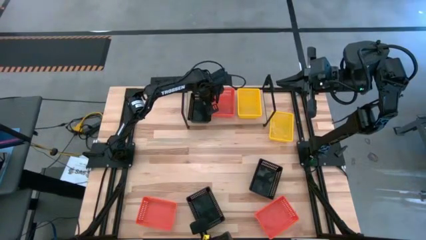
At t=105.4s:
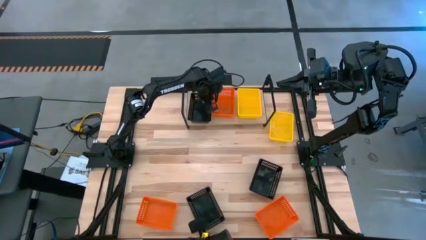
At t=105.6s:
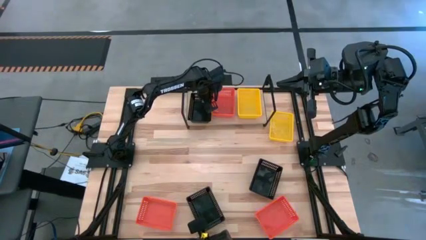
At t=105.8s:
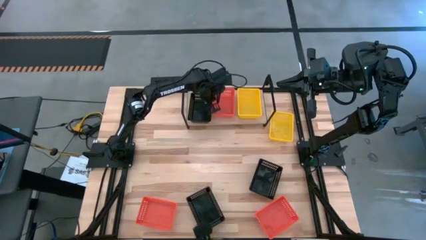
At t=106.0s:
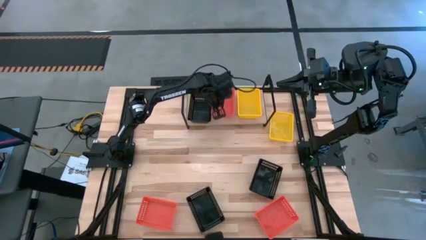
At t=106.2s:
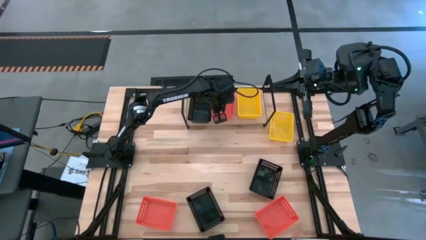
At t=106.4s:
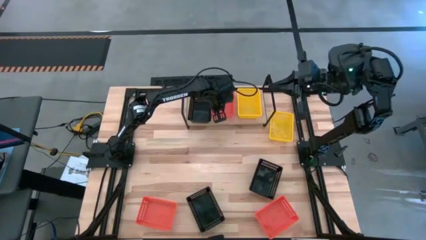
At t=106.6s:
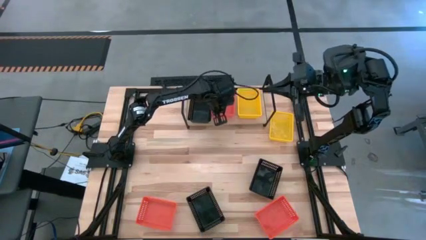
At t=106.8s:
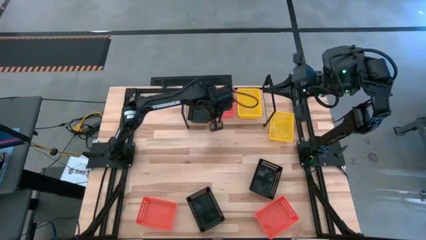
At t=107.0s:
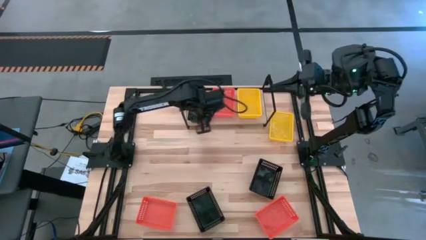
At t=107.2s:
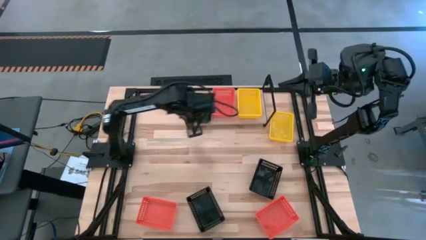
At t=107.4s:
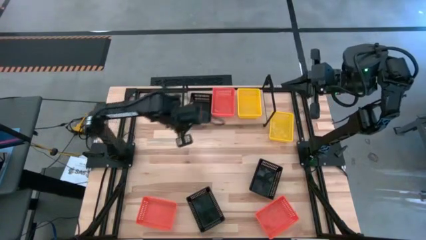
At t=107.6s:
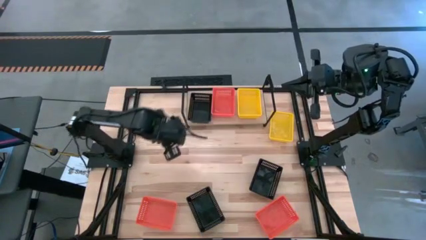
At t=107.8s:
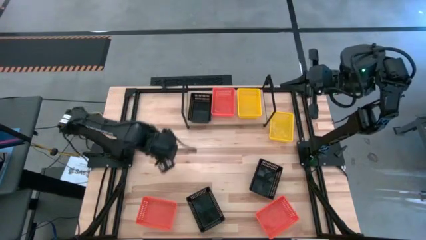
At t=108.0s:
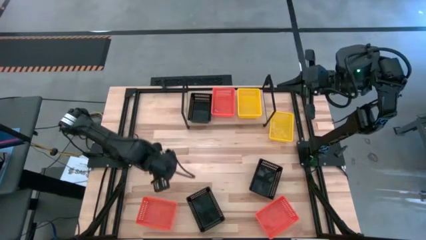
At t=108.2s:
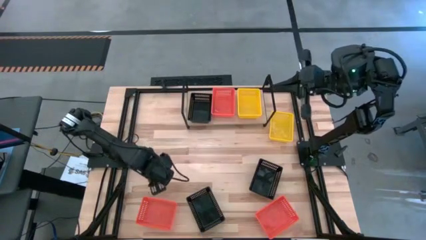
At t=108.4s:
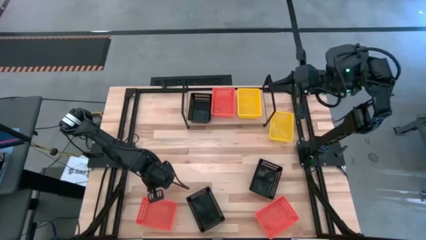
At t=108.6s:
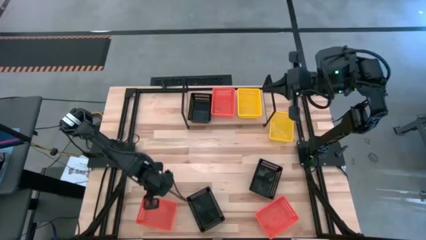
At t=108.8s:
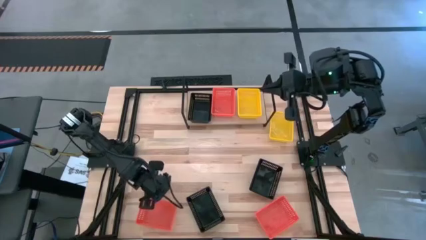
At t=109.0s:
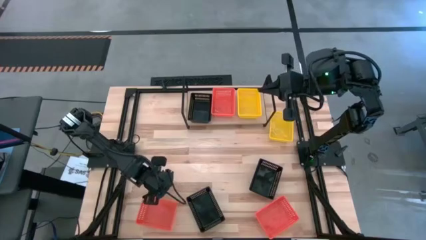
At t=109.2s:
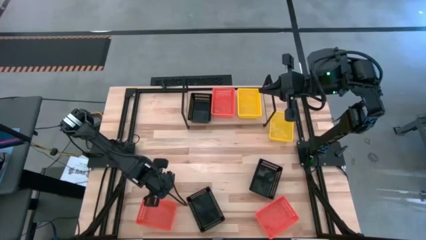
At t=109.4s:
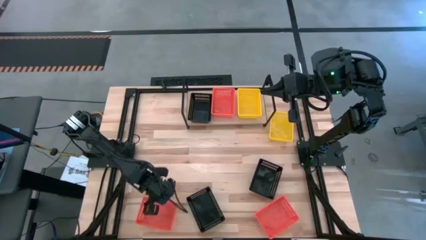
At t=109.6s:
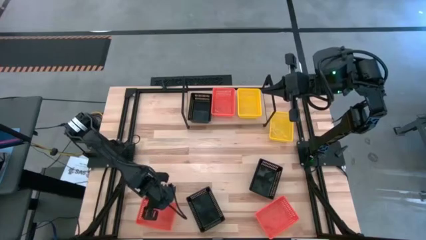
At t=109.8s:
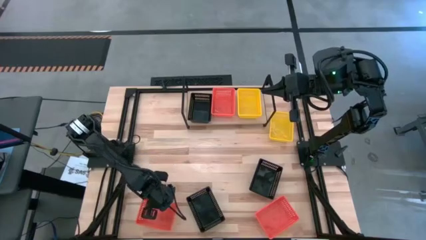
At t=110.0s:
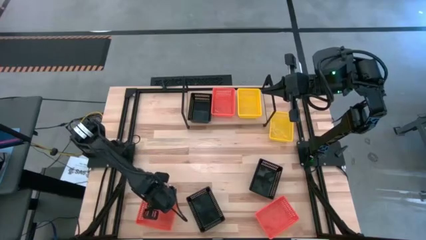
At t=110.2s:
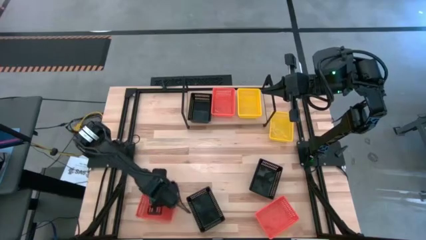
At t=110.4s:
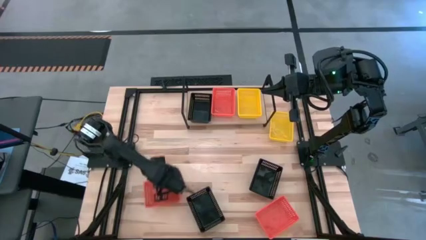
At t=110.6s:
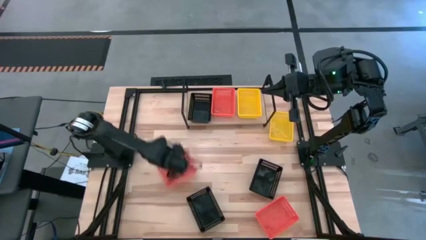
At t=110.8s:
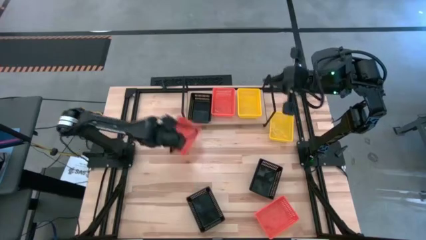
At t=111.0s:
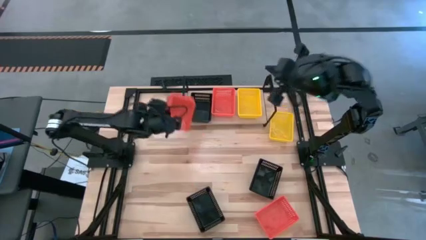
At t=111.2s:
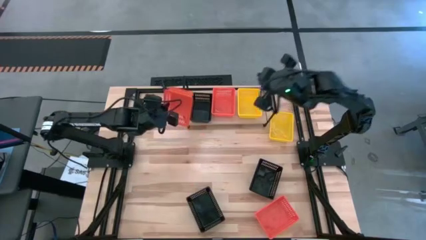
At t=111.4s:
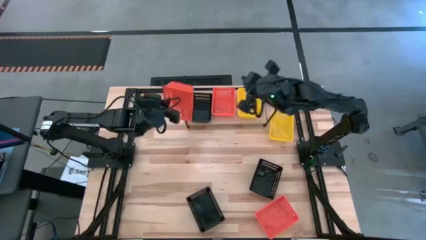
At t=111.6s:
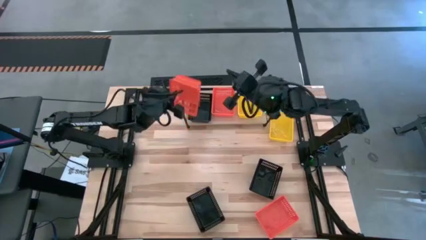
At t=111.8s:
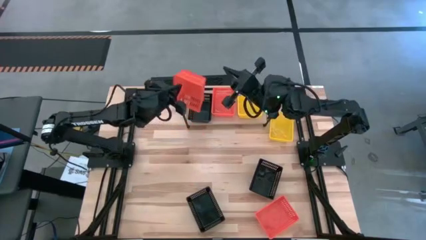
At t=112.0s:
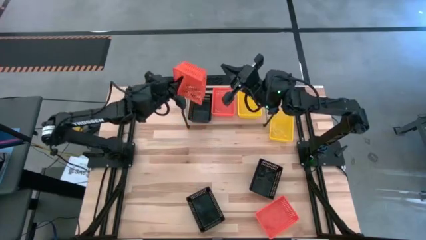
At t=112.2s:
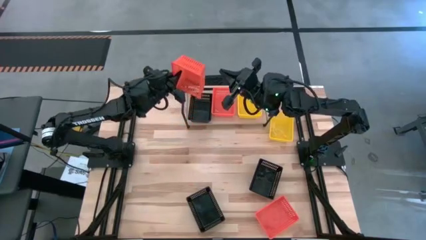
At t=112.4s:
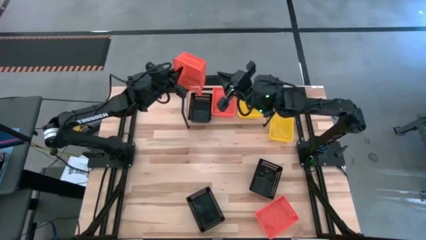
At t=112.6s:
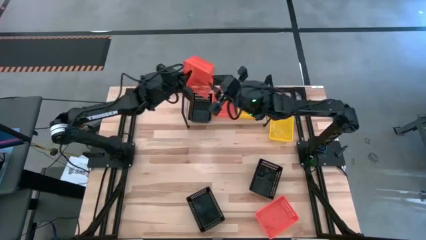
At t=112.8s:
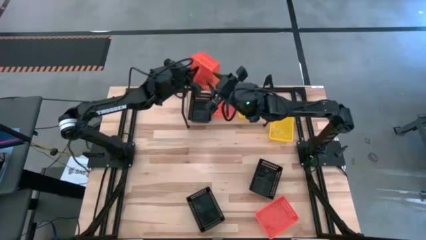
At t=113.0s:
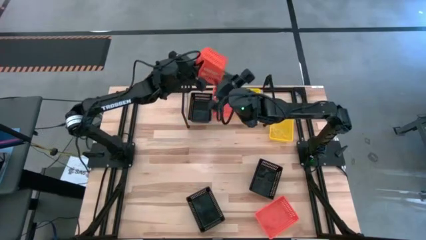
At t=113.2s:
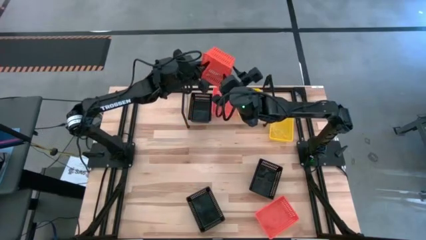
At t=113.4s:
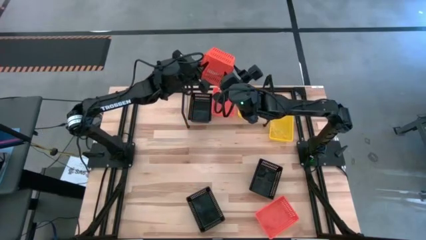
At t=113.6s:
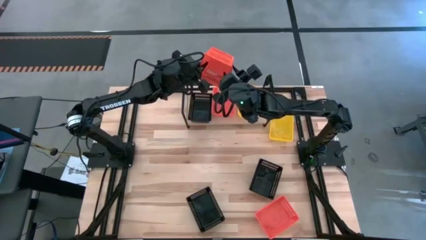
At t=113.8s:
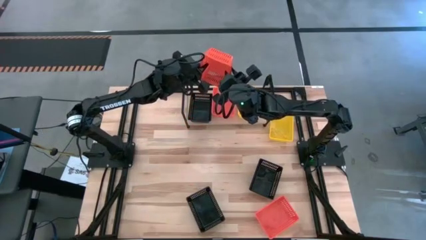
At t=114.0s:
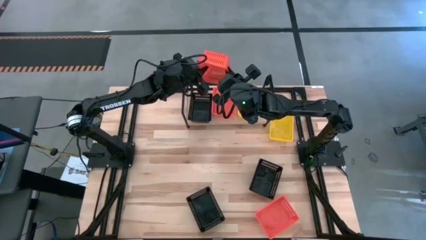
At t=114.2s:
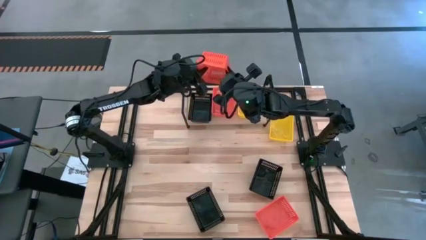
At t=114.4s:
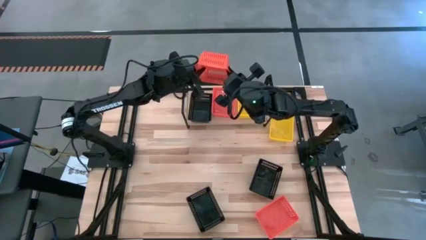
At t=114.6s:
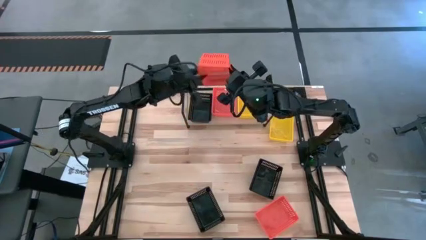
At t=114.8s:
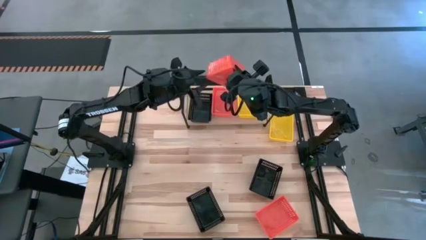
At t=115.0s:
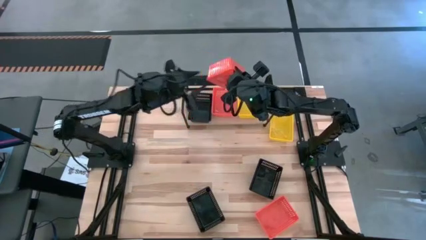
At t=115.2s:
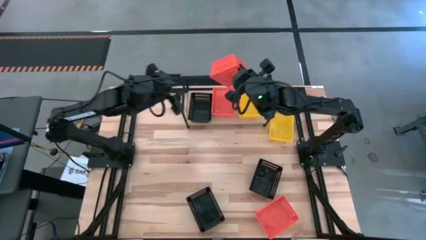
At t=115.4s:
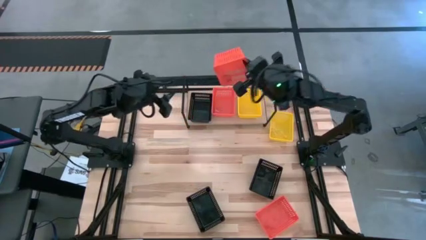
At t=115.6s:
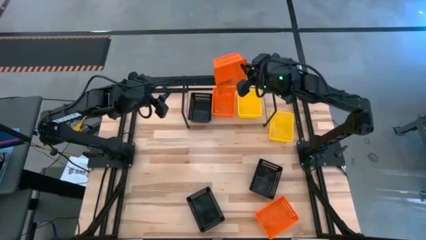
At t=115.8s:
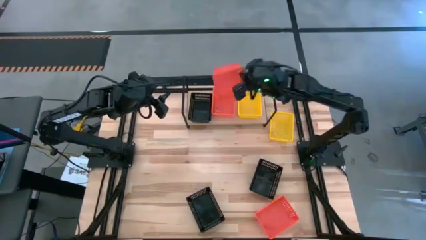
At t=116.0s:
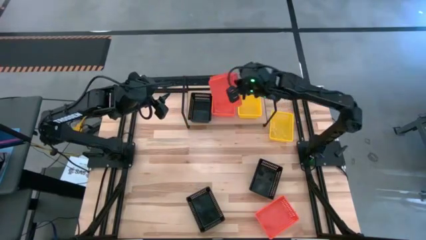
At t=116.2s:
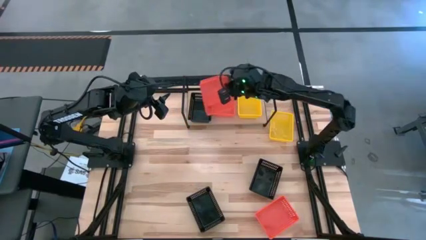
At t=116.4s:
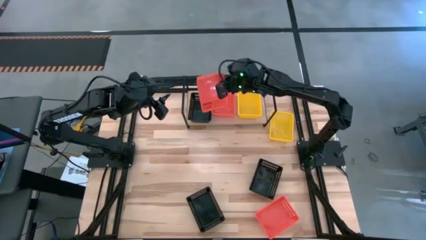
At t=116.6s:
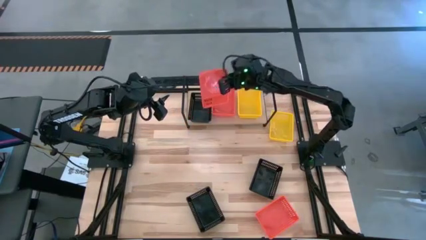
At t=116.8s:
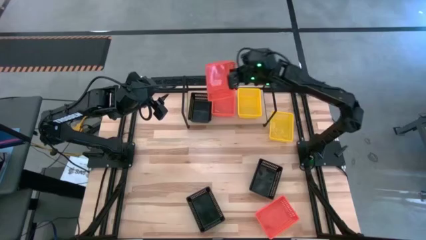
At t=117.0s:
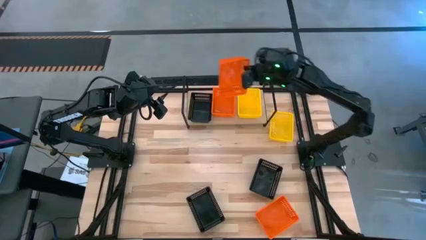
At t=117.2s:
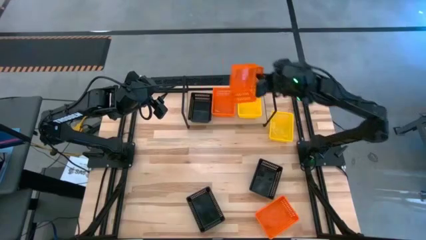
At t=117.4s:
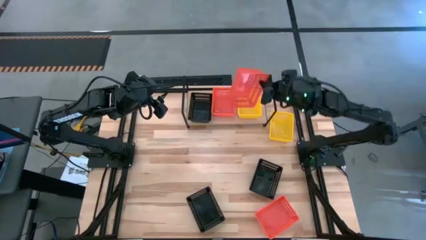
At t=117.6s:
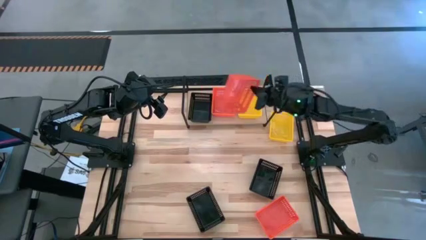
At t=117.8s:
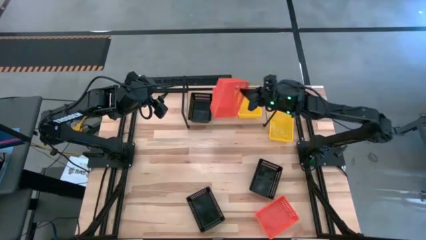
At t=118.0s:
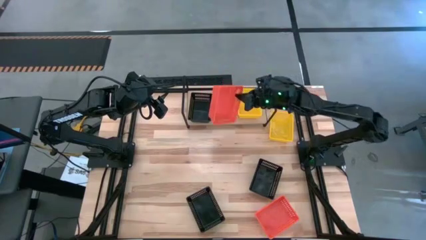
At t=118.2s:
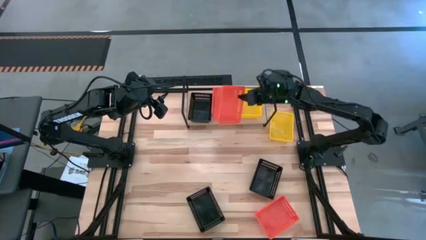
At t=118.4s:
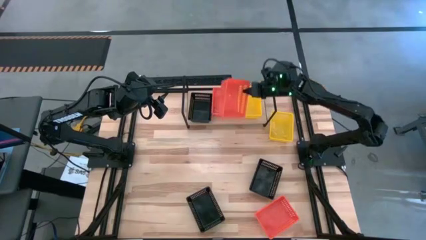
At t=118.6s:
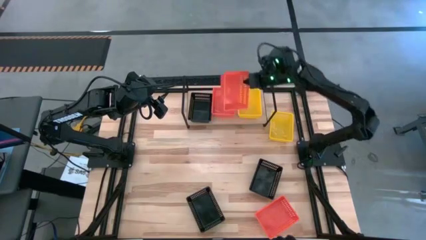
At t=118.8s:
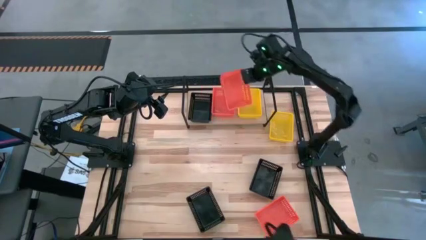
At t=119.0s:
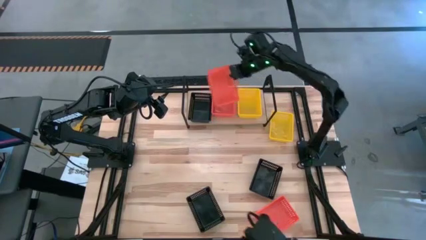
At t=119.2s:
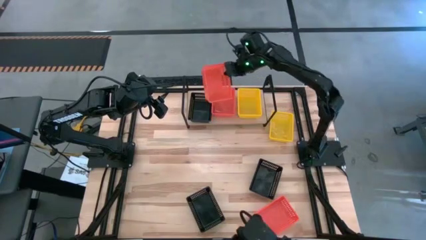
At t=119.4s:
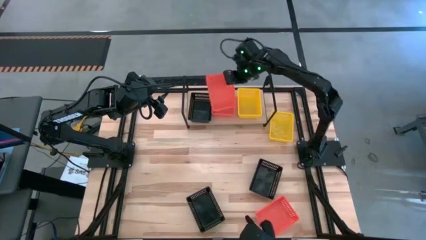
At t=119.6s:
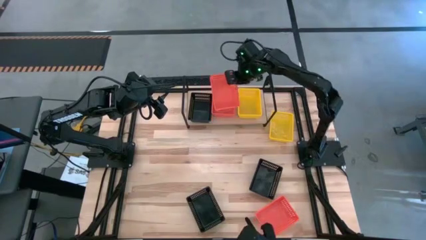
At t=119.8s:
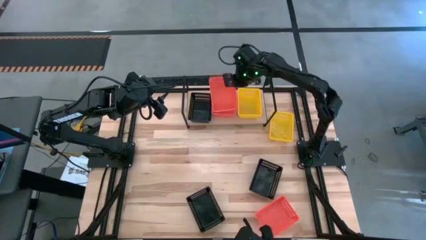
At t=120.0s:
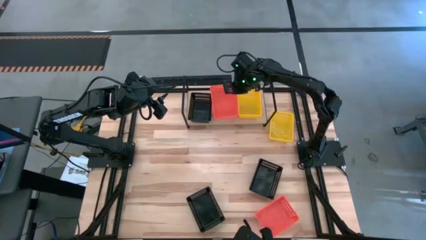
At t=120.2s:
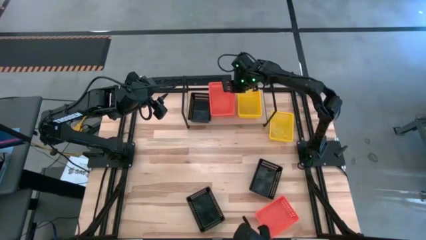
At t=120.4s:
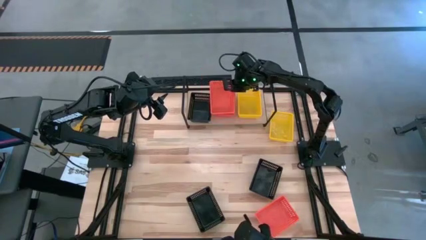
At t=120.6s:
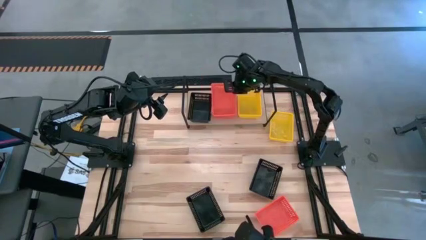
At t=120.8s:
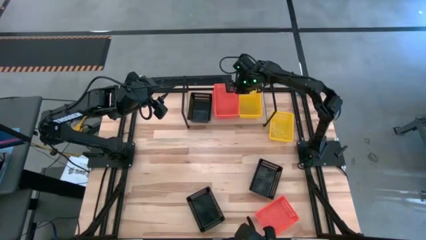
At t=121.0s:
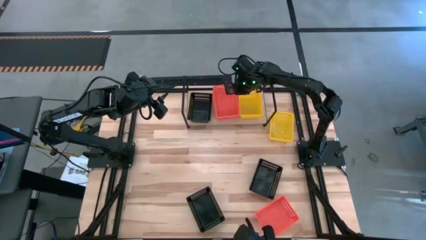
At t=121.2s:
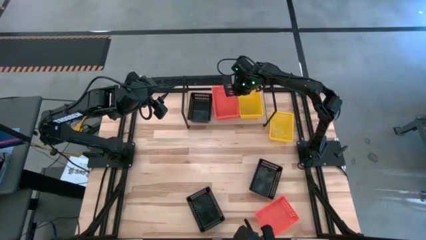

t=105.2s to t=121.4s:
Task: Stack baskets on shelf by color
Stack the left orange bin on top of the other orange bin on the shelf
